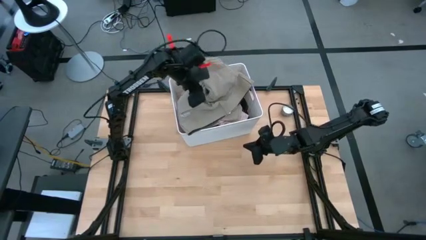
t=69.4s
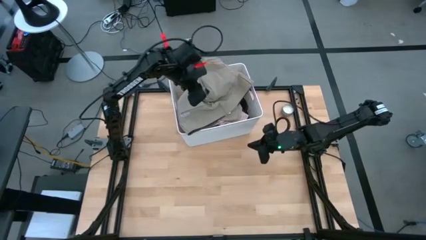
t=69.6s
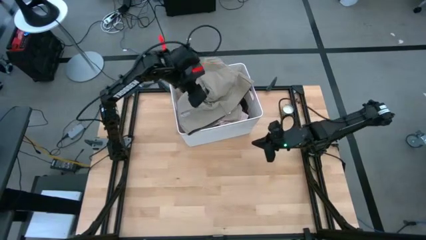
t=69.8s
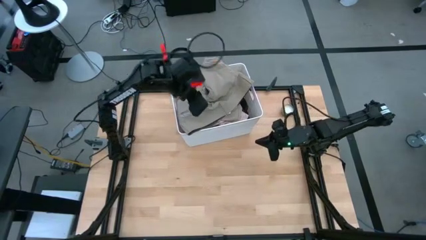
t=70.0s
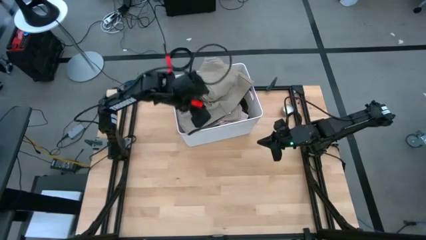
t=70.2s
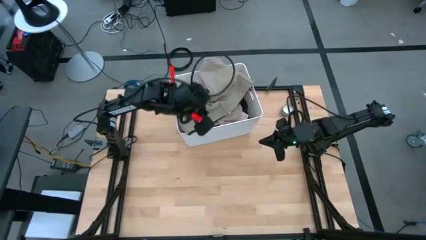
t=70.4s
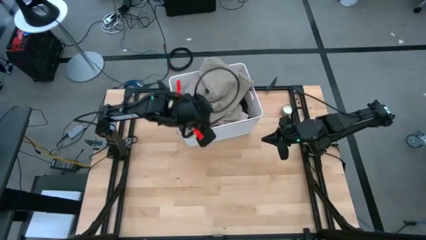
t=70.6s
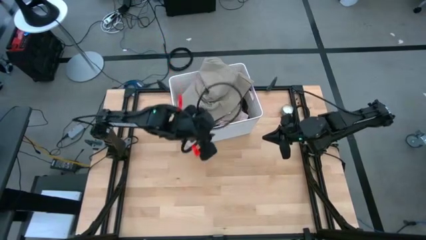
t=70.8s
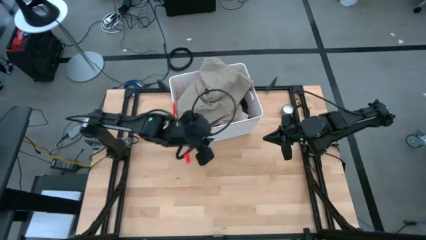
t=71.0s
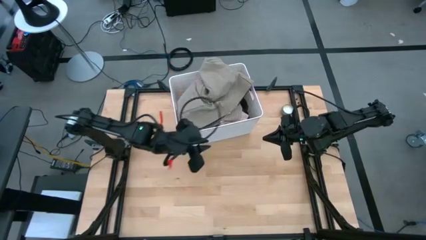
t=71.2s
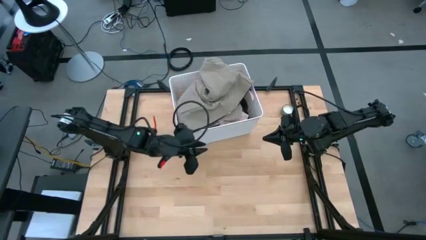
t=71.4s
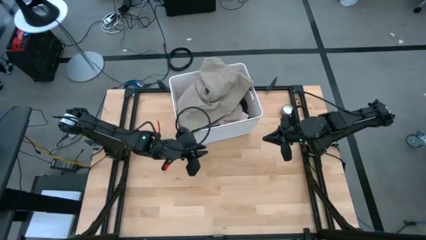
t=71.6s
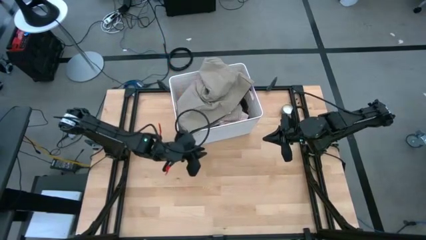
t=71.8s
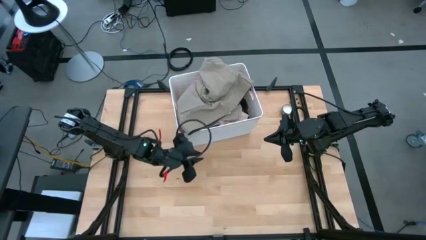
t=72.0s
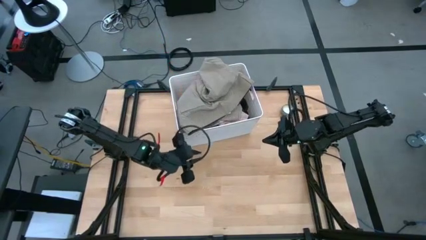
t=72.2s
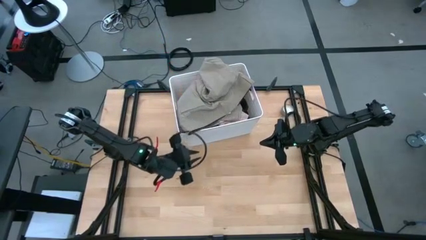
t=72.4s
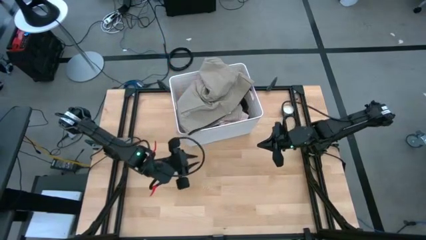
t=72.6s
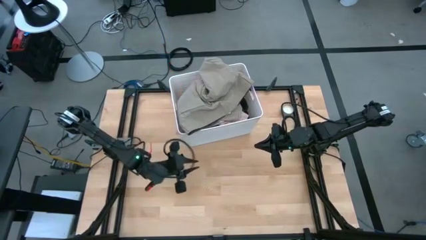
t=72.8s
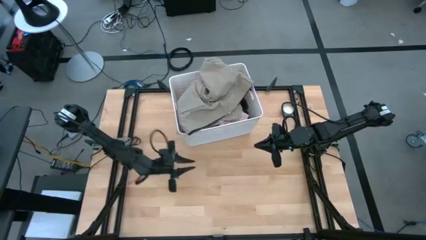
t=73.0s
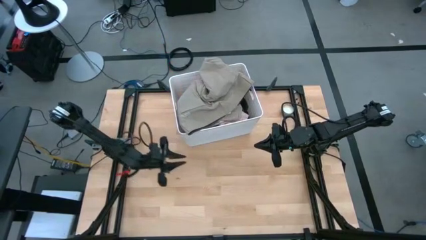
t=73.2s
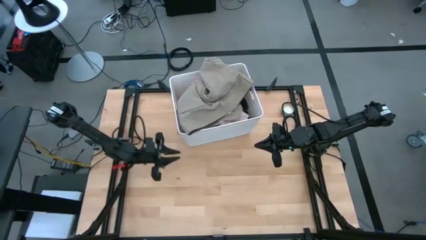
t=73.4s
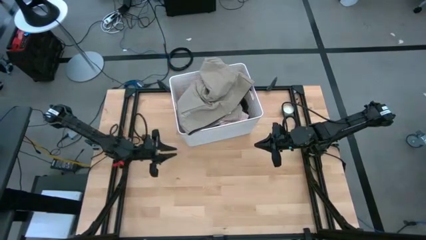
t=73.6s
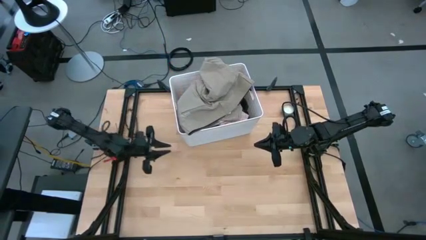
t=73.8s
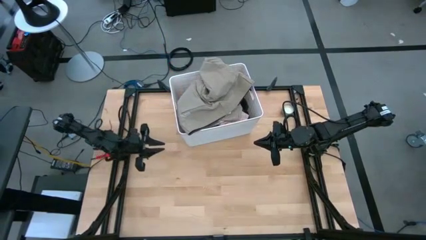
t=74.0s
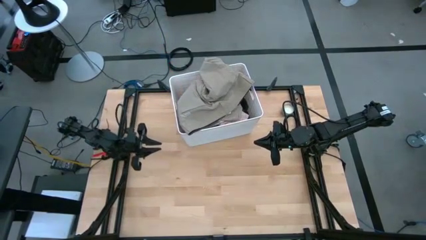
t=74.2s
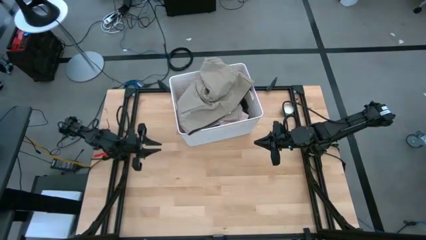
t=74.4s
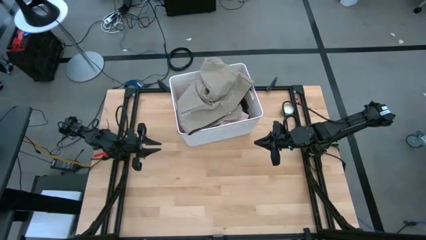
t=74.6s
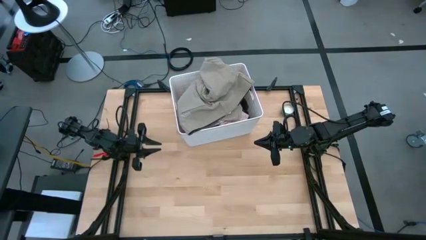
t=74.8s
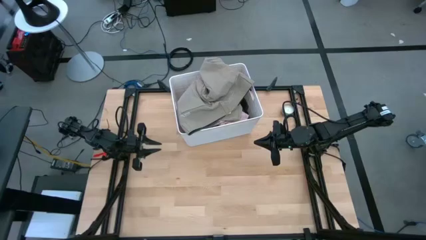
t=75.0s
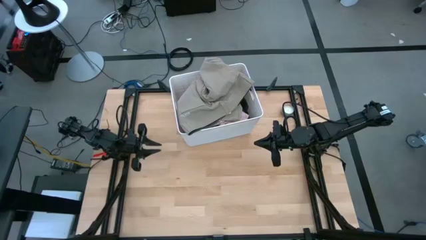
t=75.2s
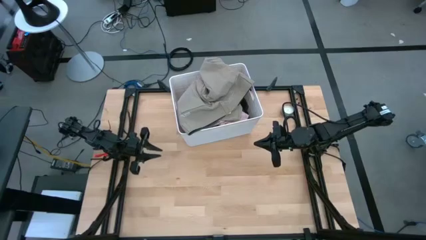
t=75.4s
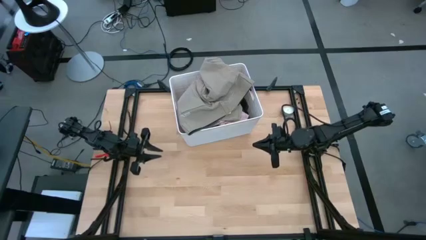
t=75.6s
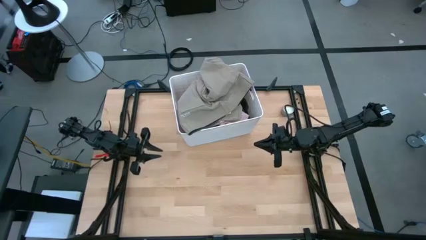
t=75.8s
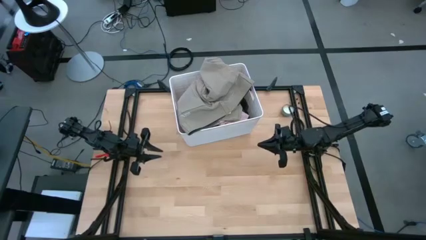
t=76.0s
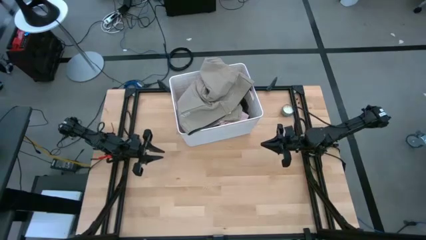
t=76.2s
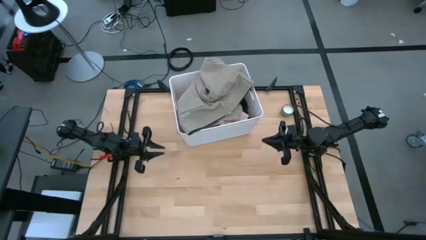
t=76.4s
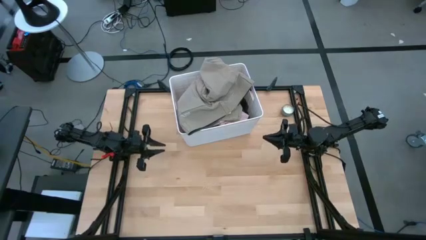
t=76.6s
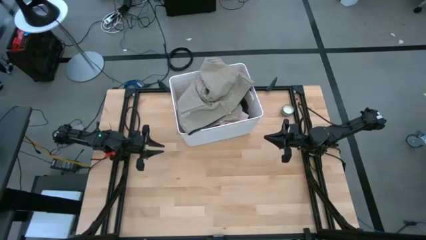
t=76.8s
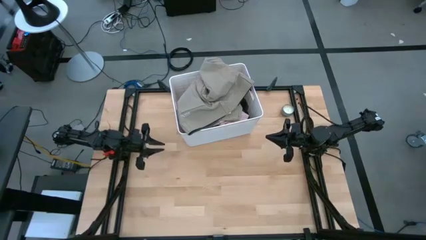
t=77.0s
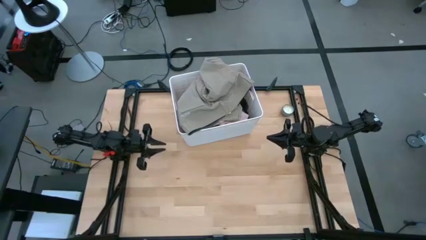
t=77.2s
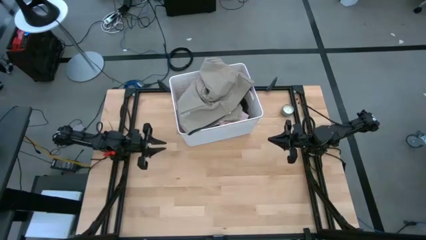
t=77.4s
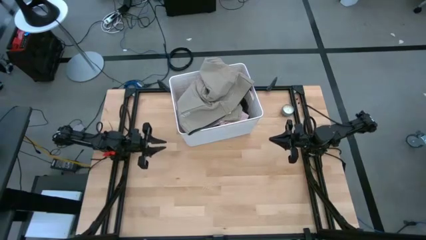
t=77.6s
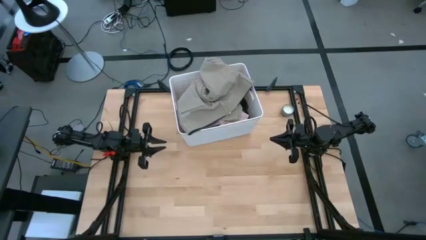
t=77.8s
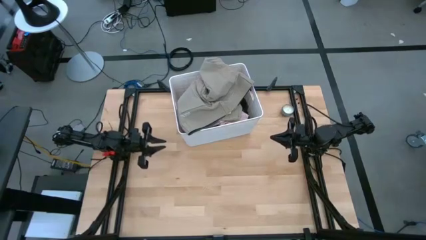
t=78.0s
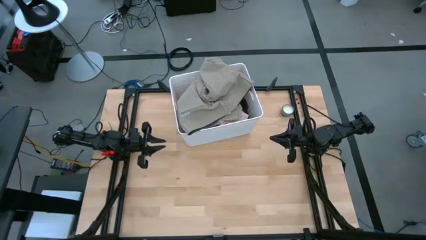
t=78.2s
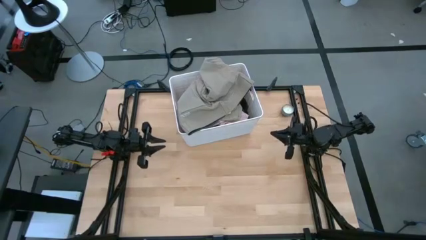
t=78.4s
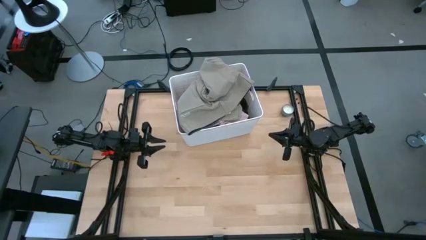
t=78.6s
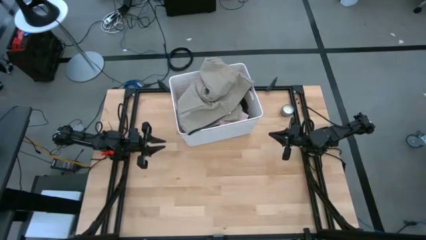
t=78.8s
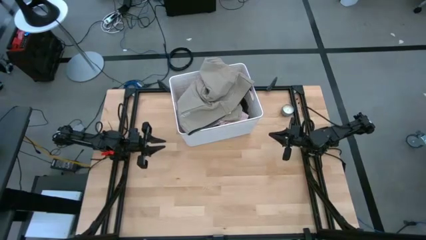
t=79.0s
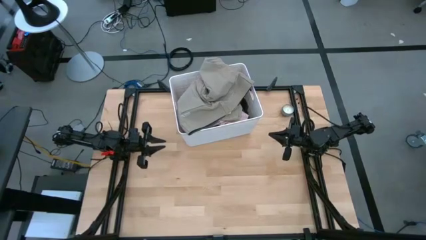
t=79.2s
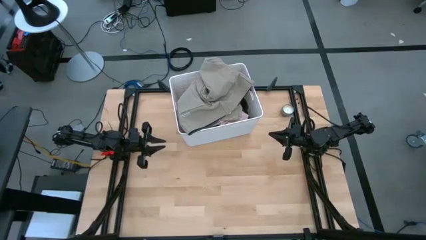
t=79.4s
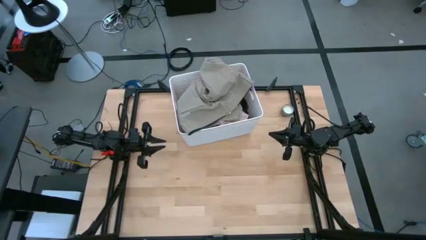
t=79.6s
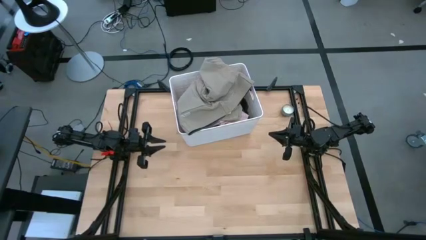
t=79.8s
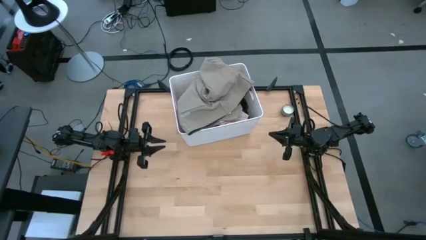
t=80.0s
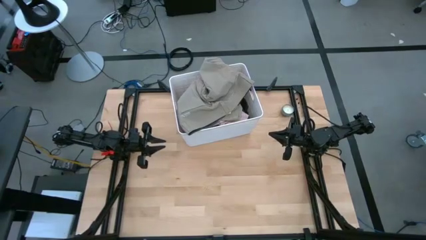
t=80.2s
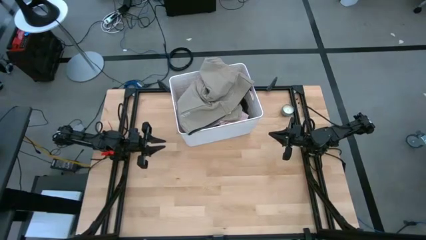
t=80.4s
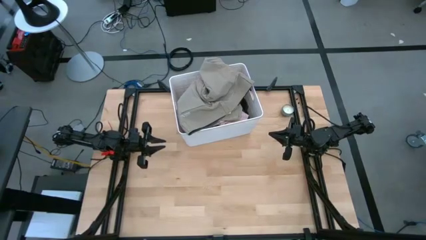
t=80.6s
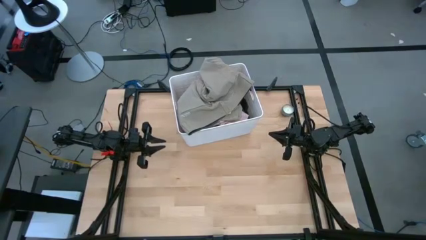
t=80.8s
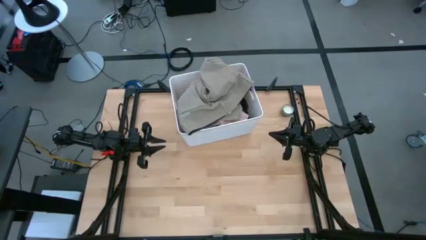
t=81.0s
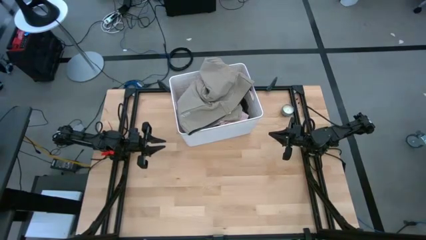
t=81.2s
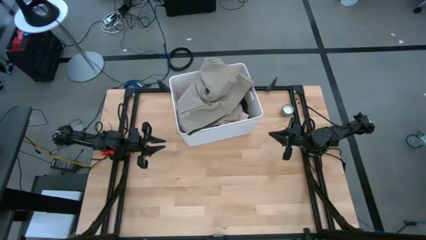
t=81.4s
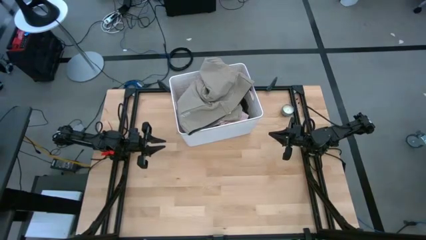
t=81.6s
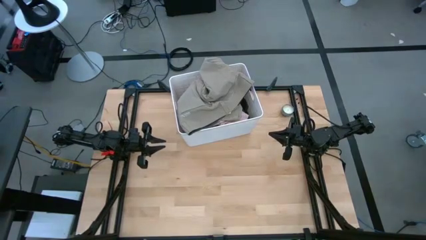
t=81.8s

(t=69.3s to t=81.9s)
Task: Sort clothes
Return to Home Position
